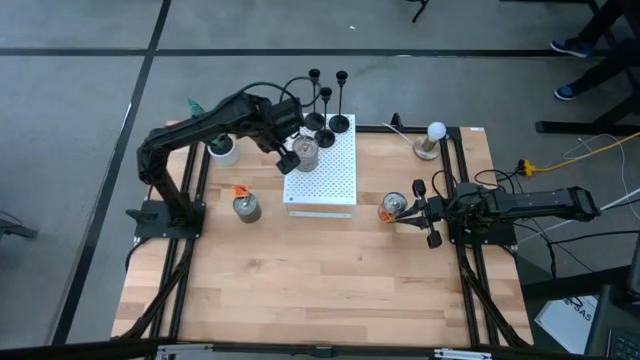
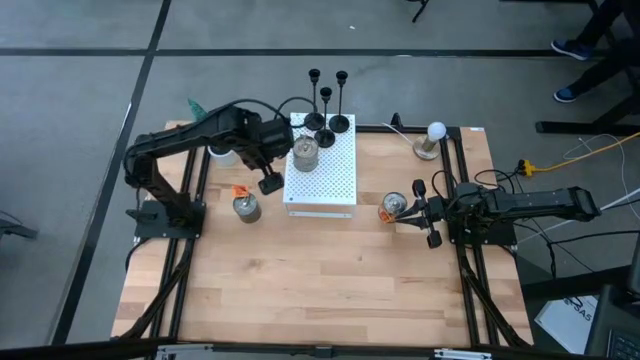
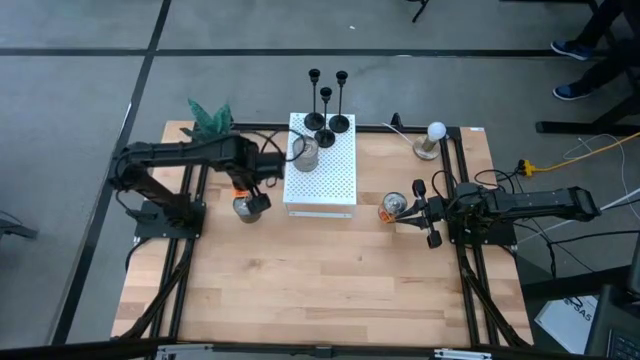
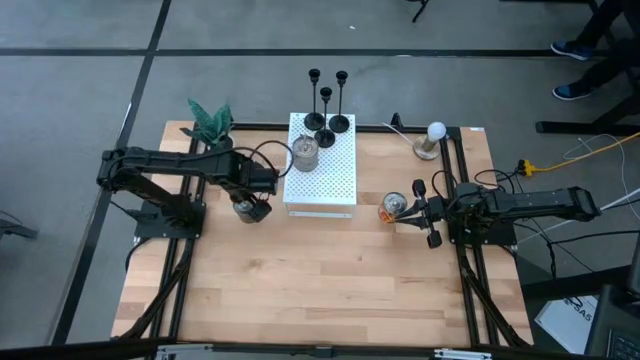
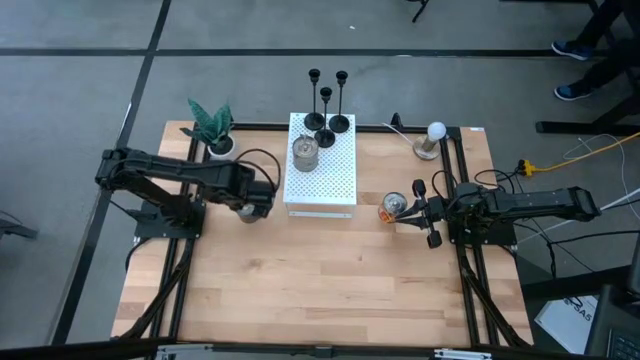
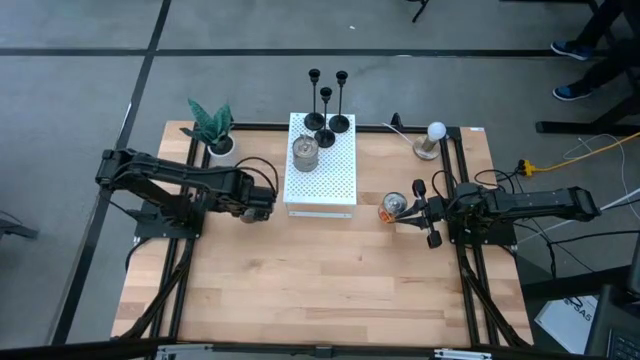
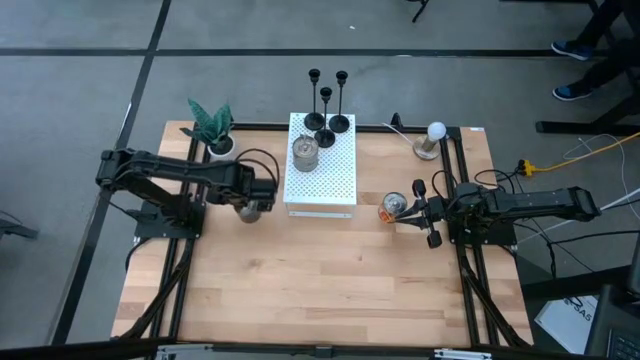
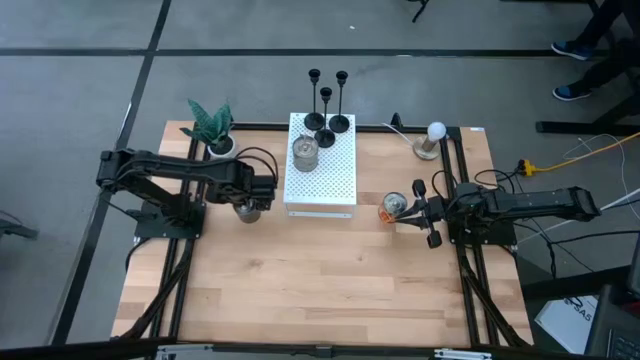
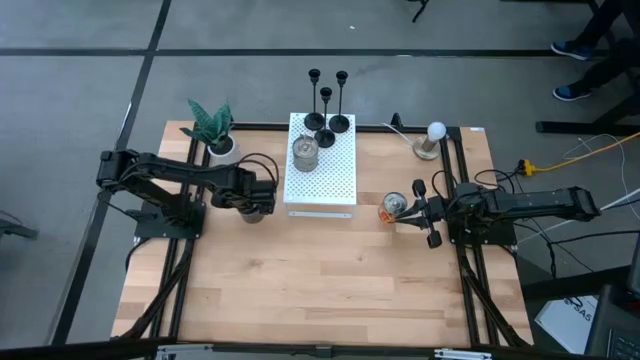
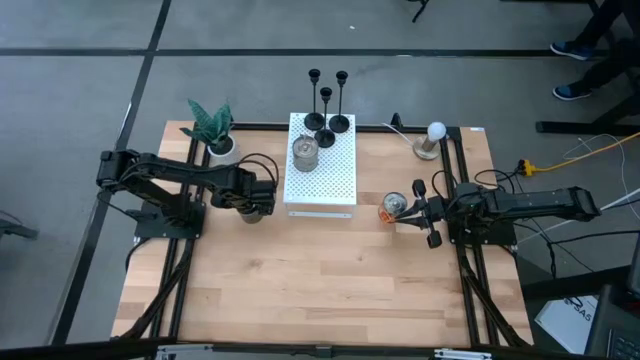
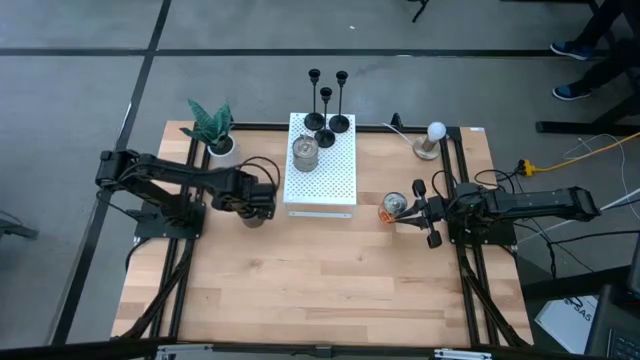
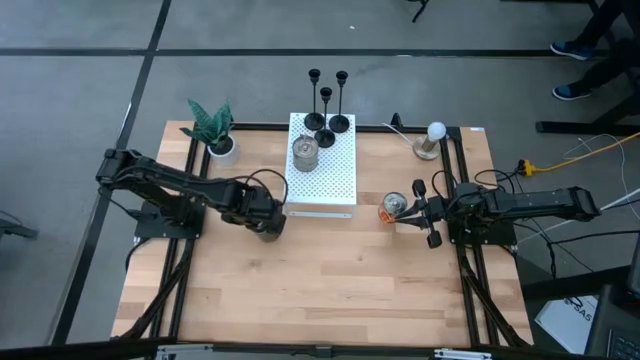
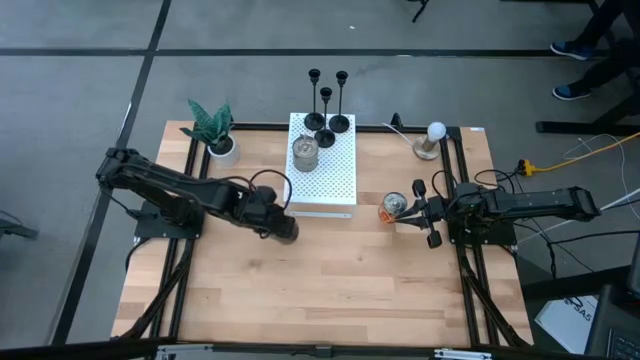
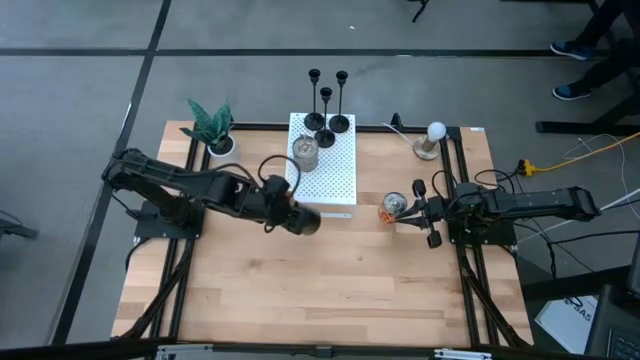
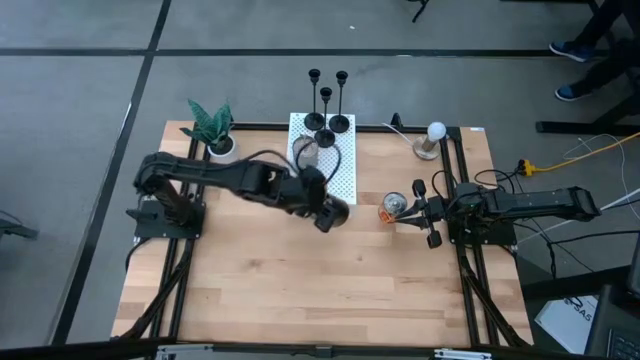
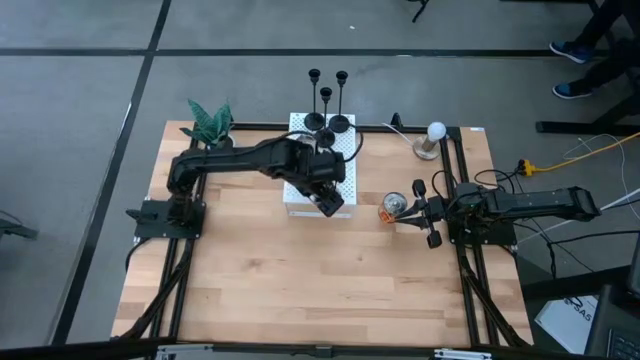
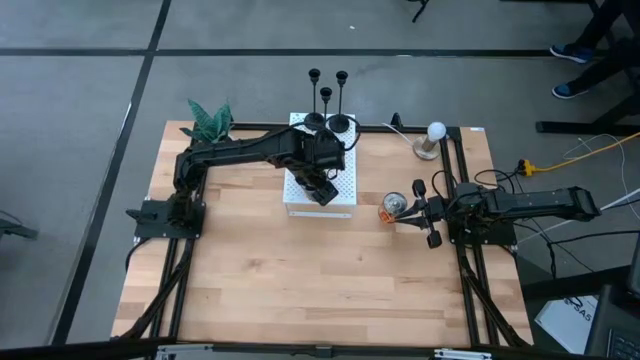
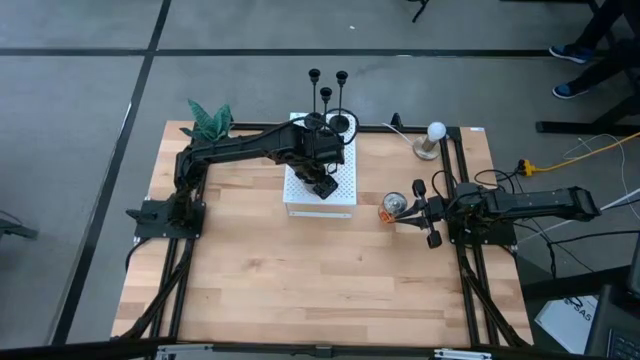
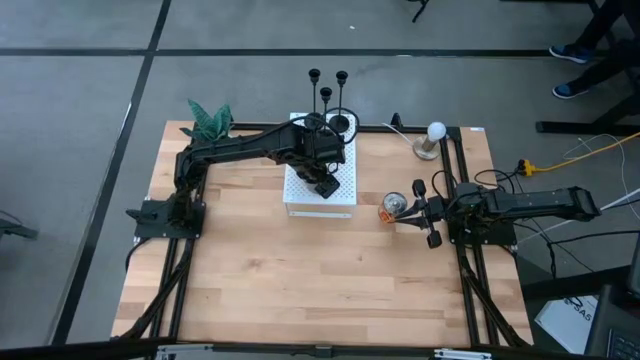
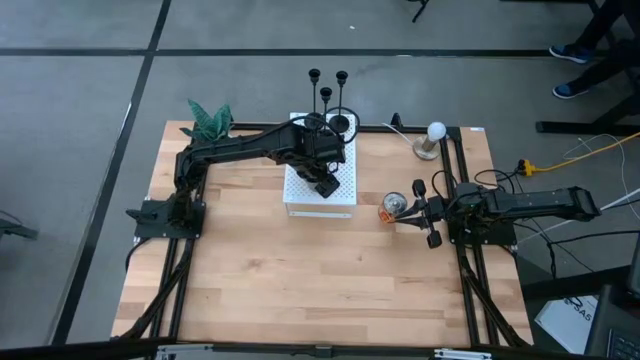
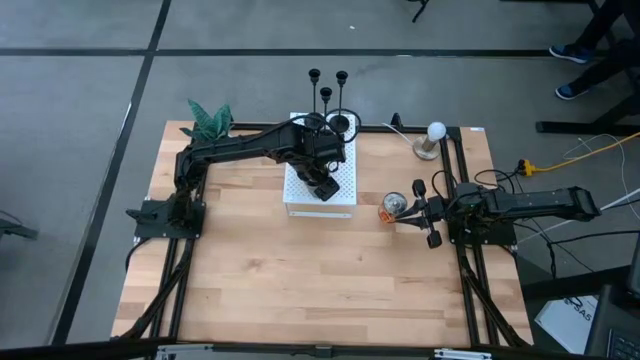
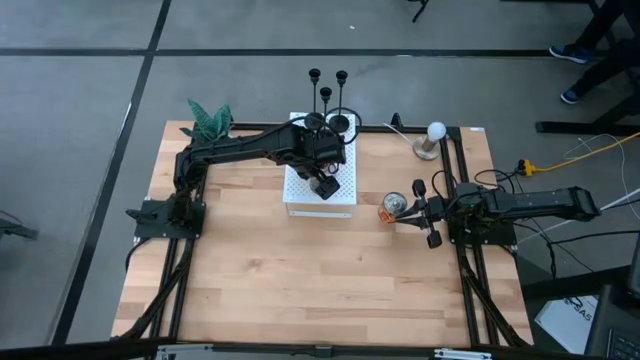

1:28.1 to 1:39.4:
Task: Pick & Place candle stick holders
Put the left orange scented candle on the shelf

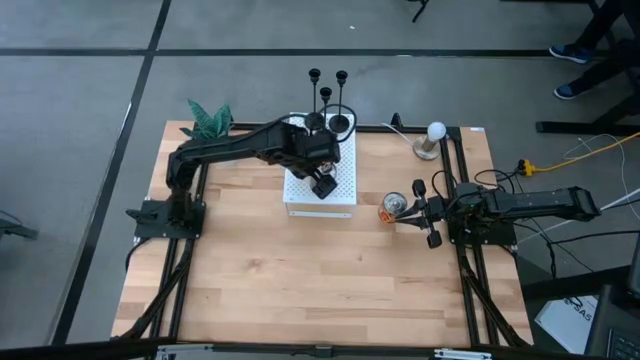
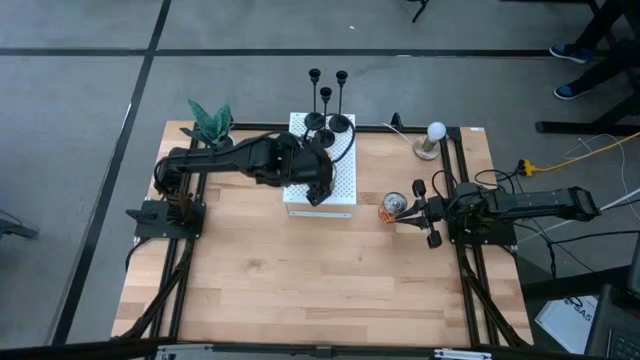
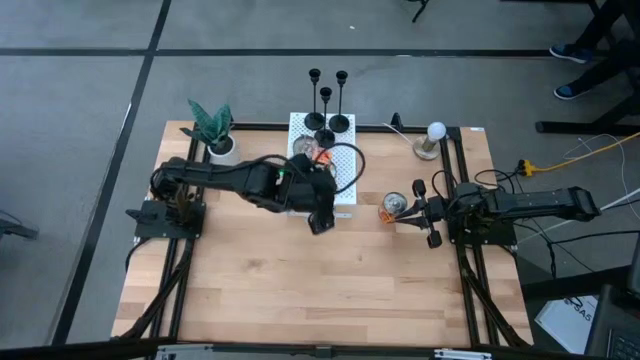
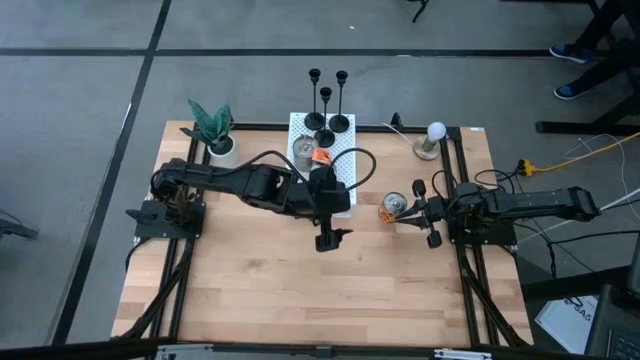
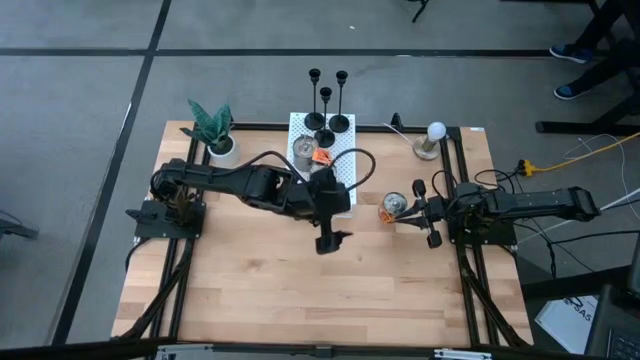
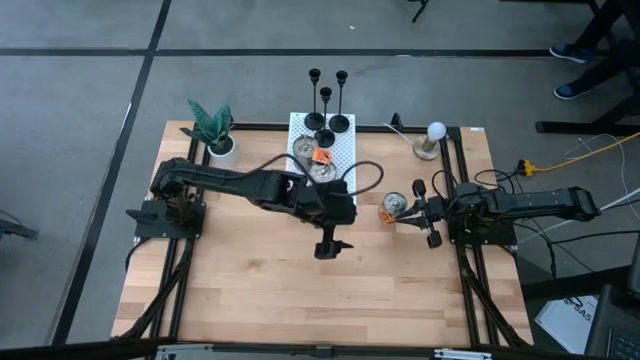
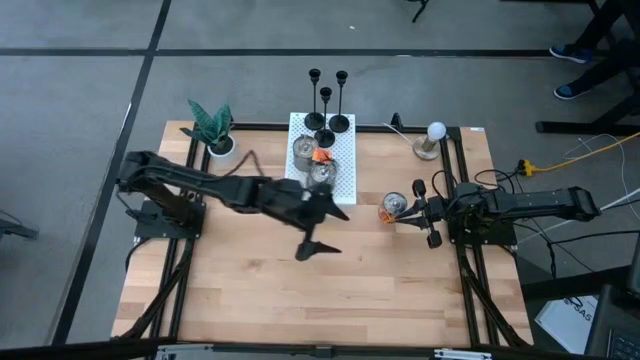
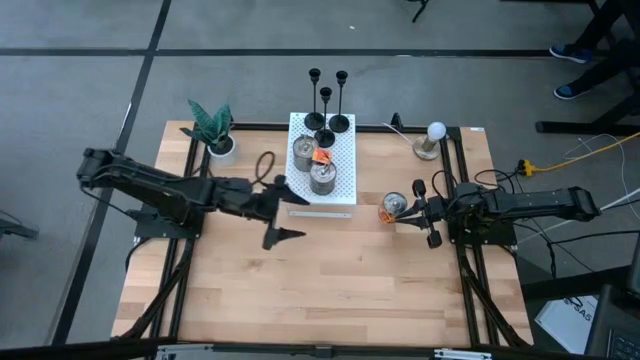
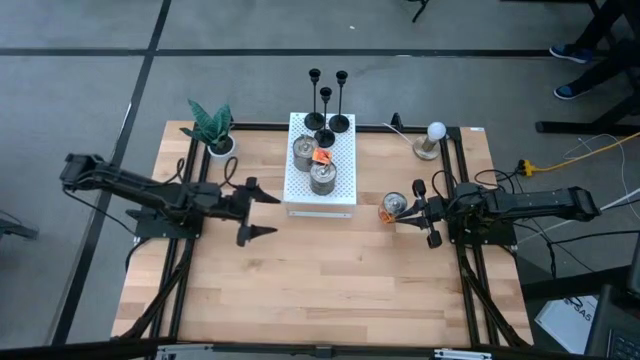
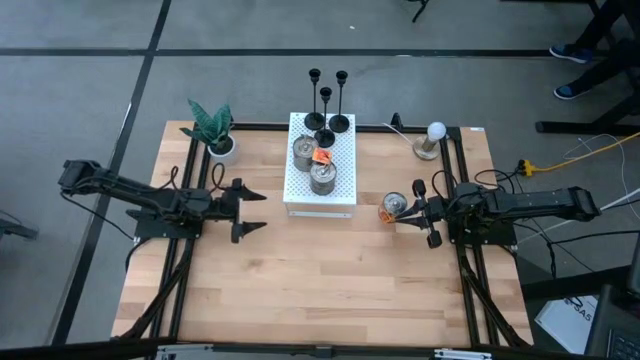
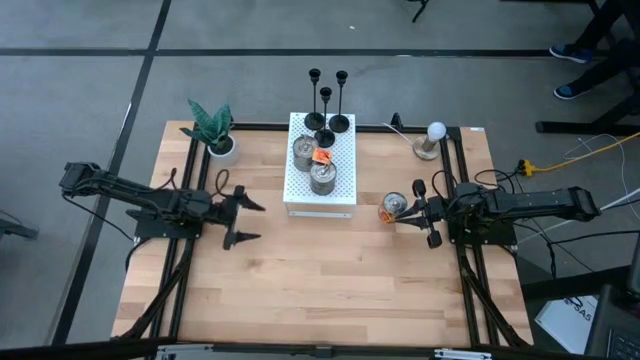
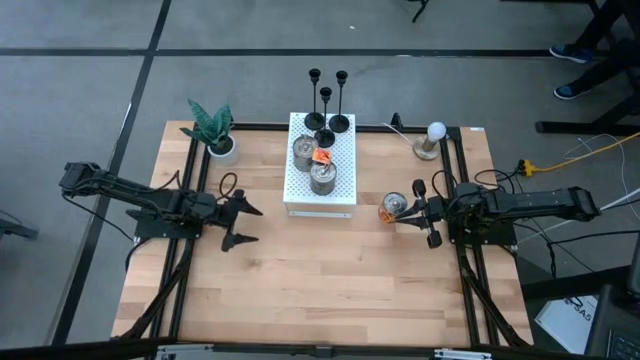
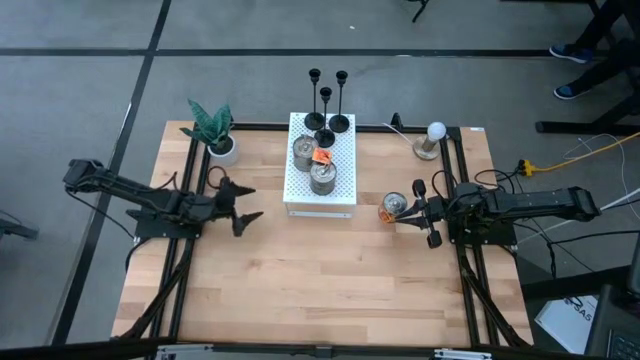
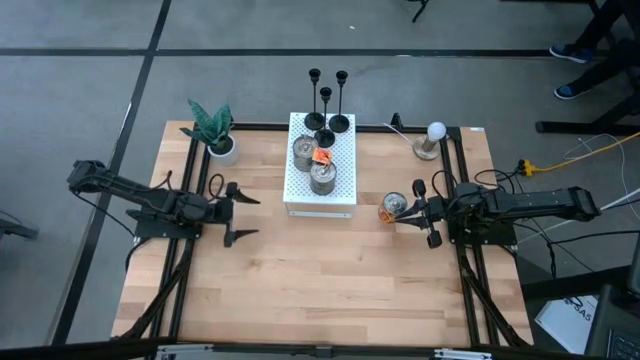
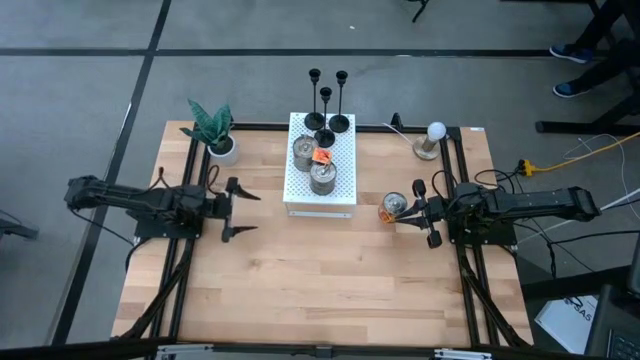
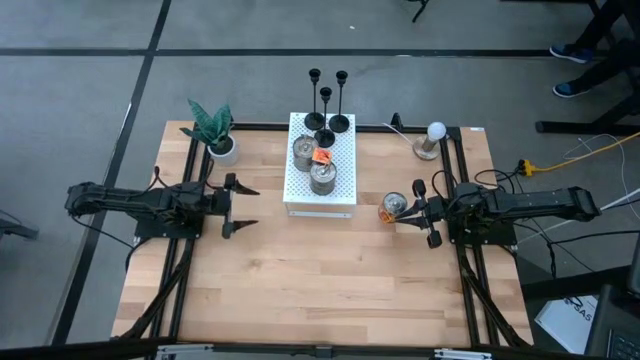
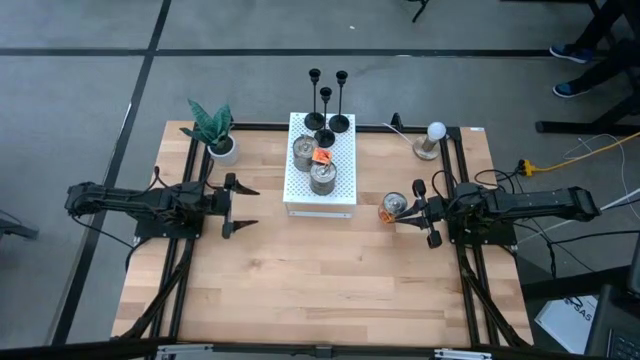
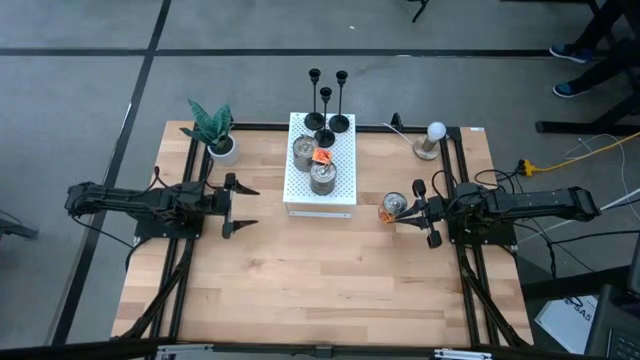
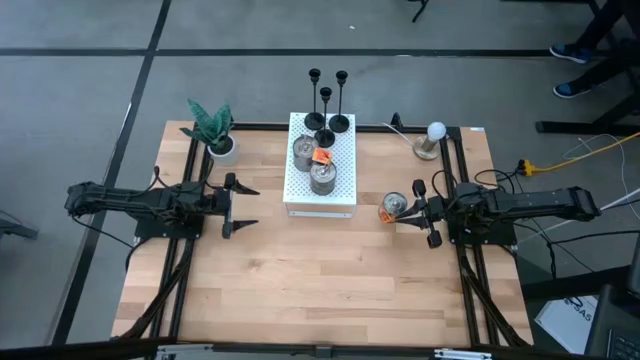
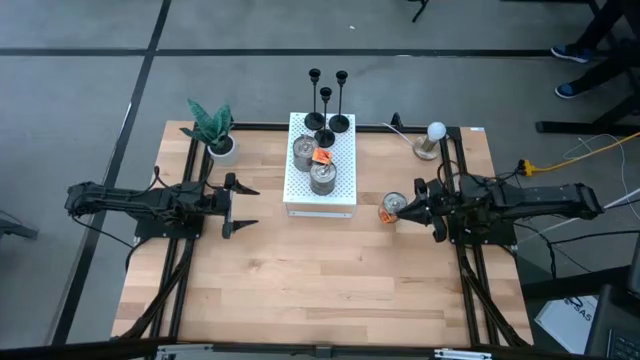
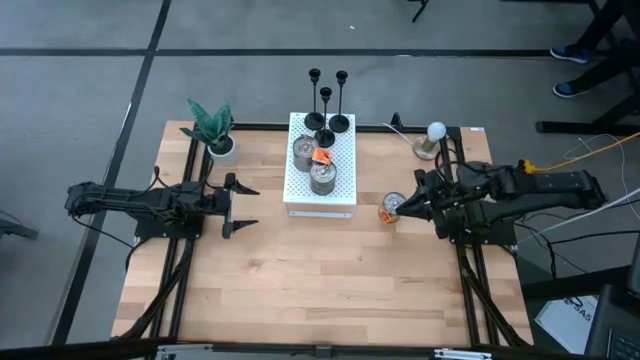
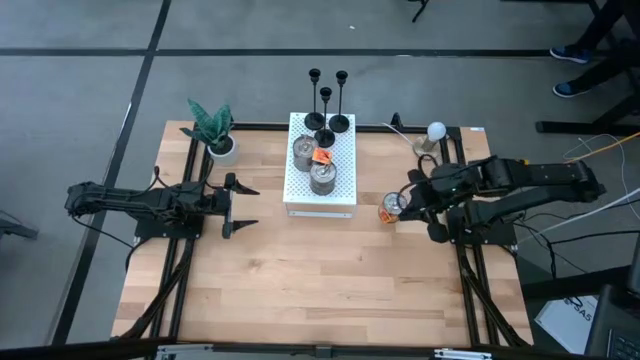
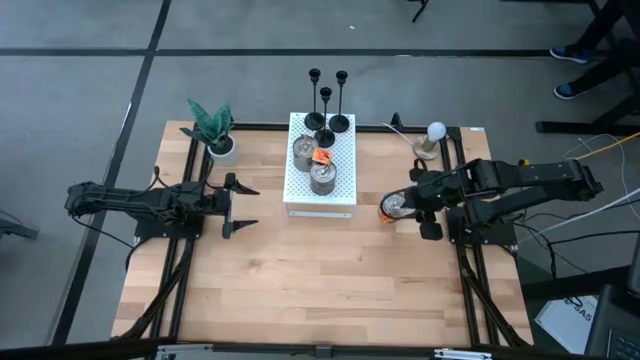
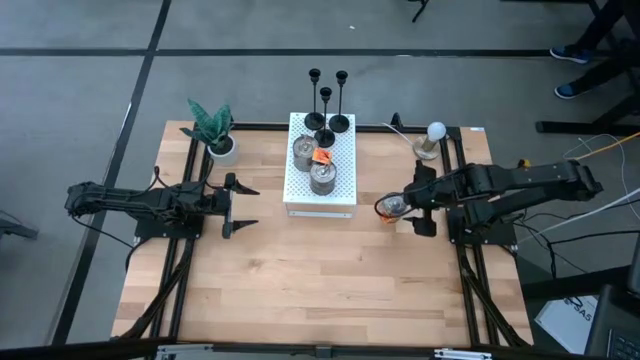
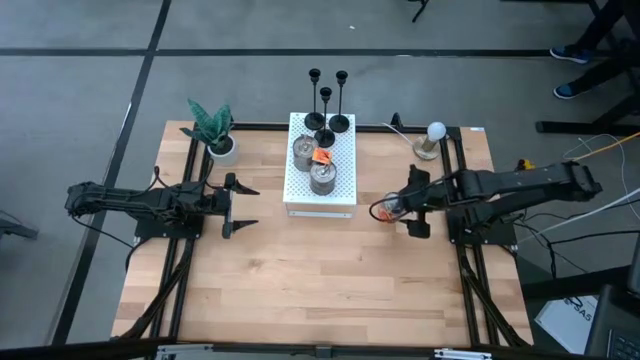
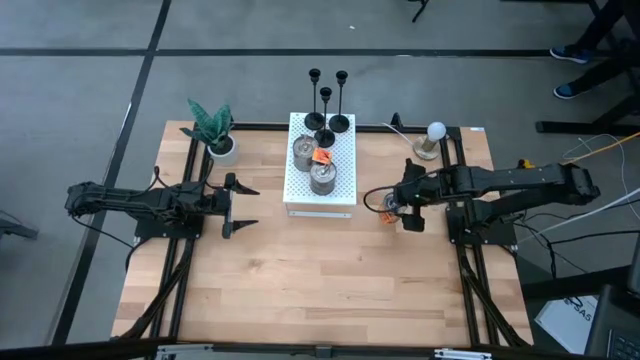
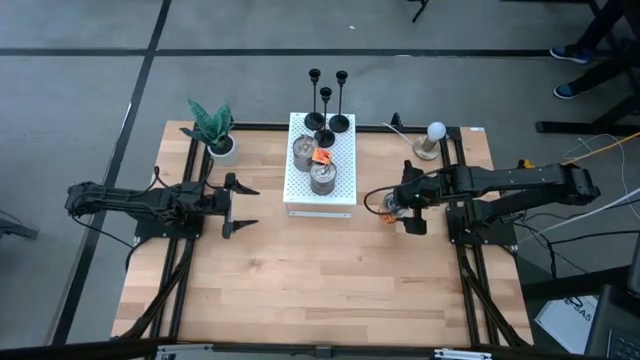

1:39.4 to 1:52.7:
Put the orange scented candle on the shelf
